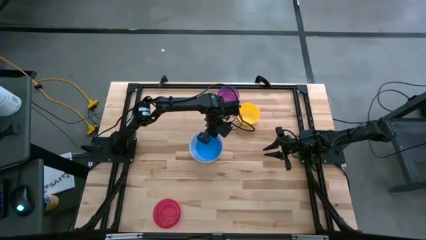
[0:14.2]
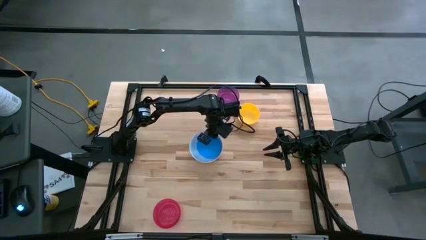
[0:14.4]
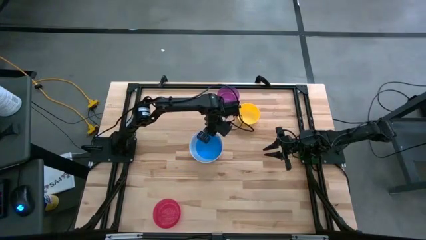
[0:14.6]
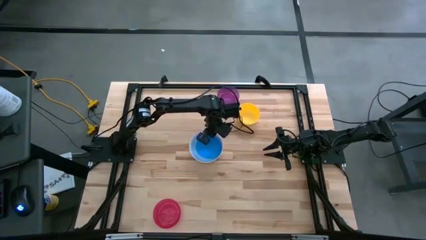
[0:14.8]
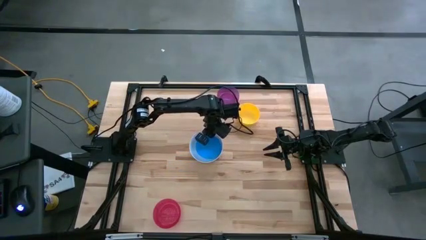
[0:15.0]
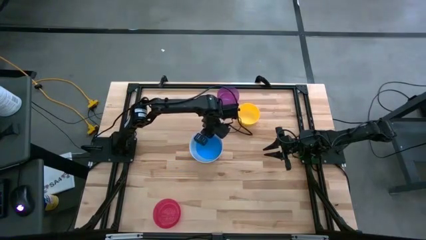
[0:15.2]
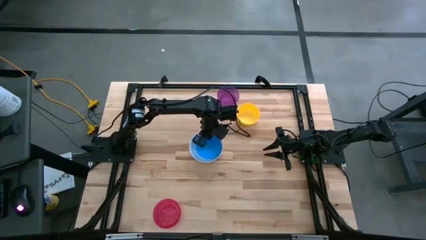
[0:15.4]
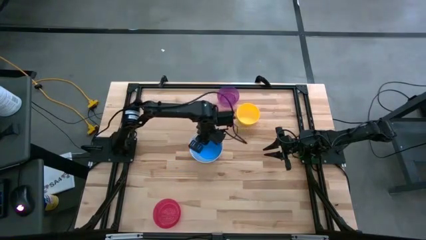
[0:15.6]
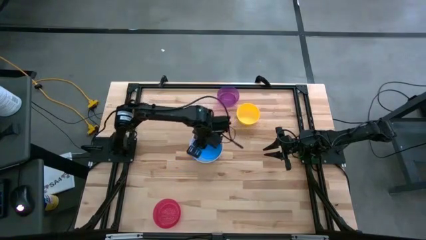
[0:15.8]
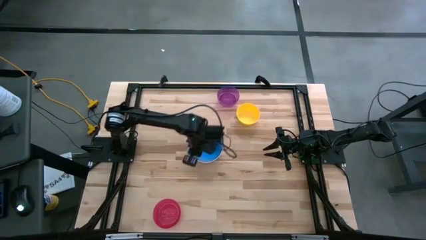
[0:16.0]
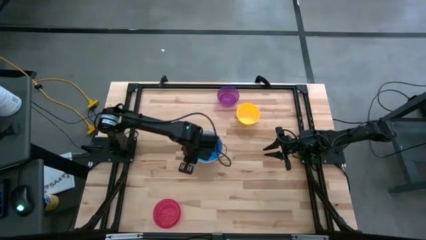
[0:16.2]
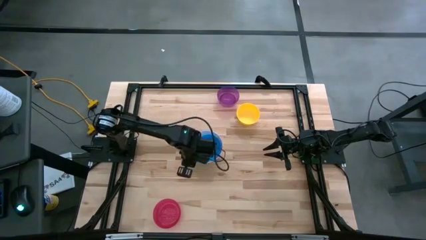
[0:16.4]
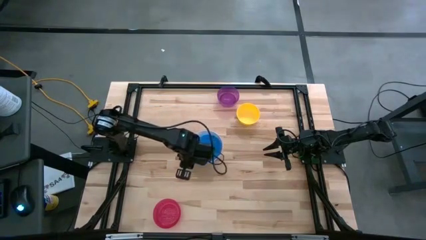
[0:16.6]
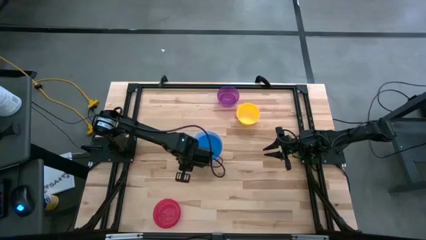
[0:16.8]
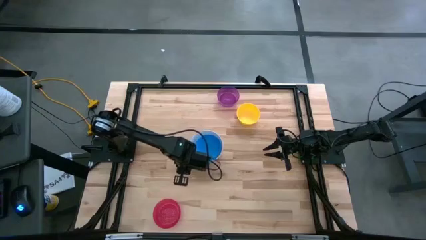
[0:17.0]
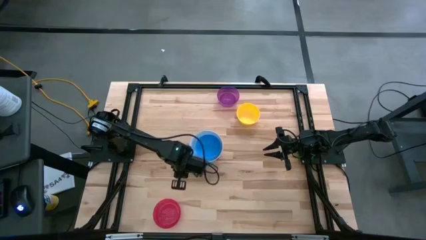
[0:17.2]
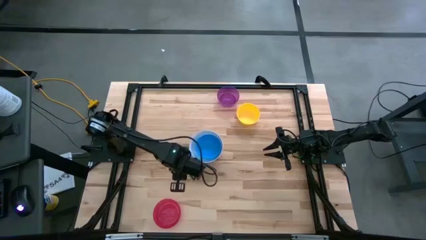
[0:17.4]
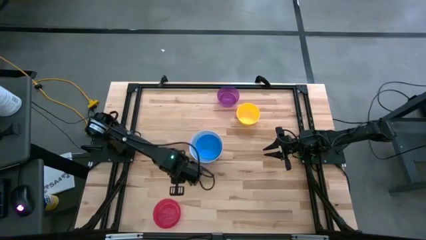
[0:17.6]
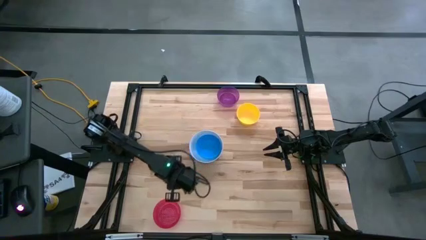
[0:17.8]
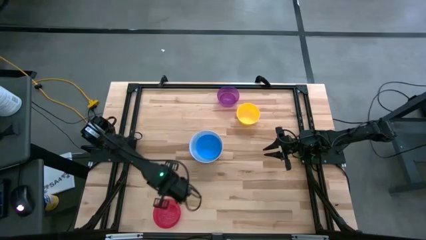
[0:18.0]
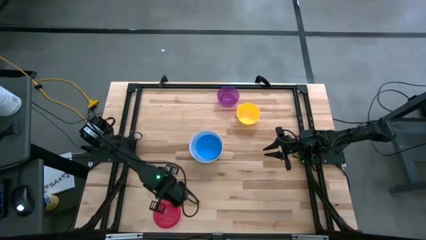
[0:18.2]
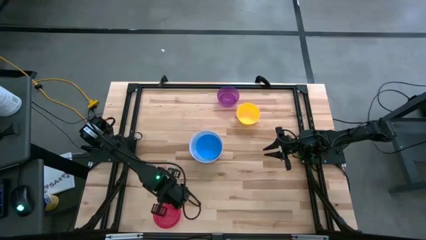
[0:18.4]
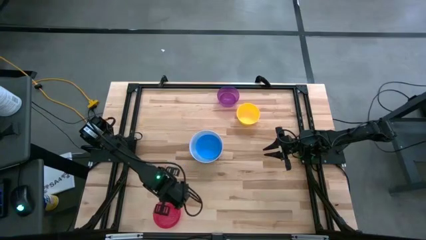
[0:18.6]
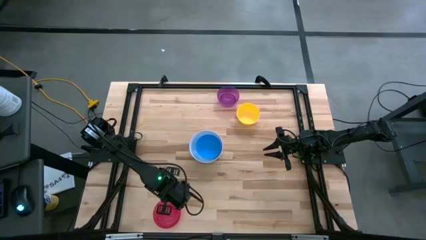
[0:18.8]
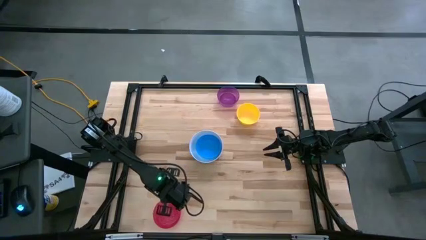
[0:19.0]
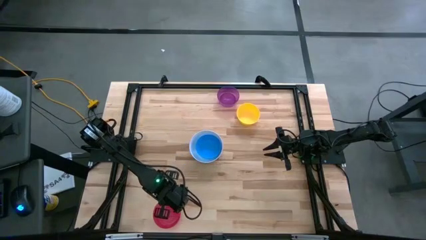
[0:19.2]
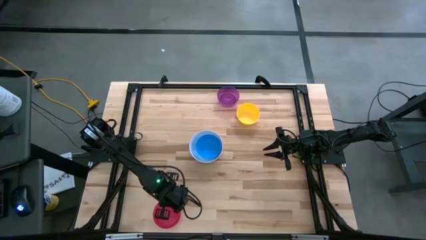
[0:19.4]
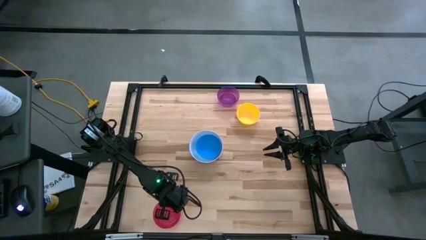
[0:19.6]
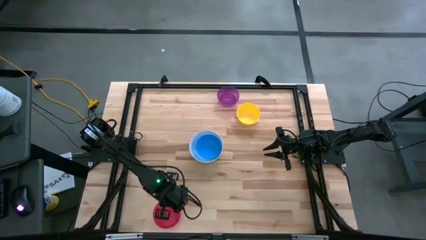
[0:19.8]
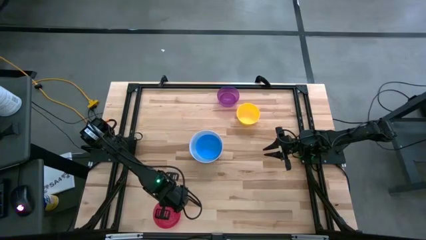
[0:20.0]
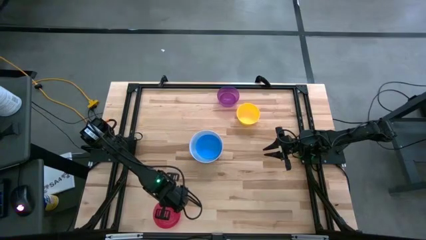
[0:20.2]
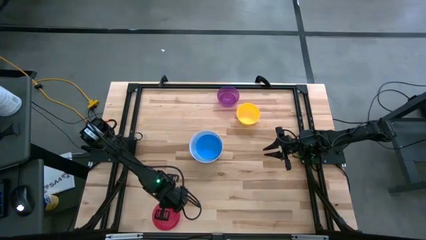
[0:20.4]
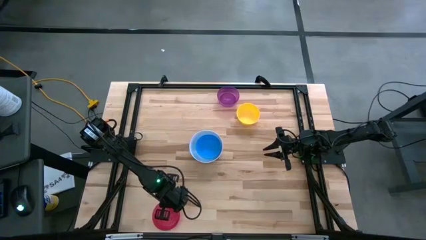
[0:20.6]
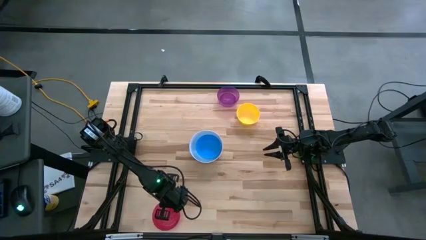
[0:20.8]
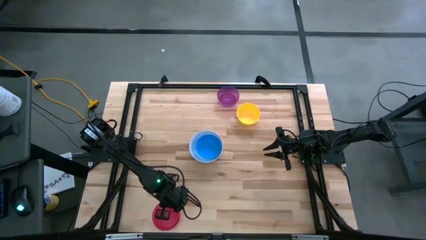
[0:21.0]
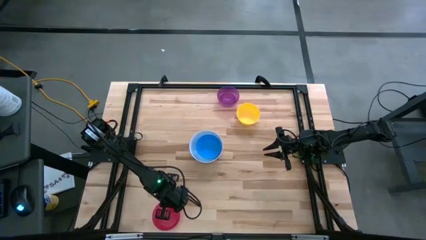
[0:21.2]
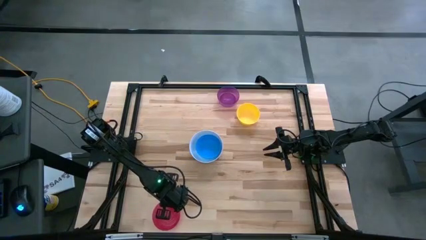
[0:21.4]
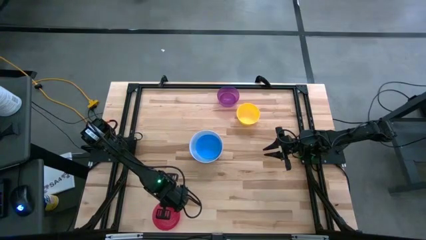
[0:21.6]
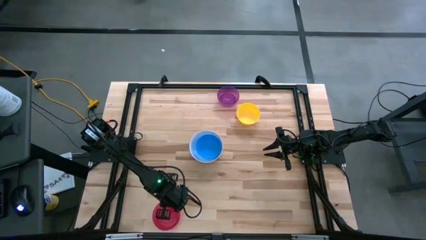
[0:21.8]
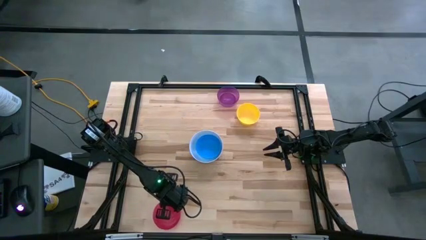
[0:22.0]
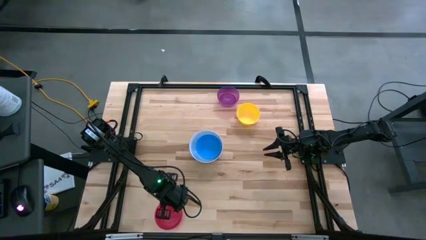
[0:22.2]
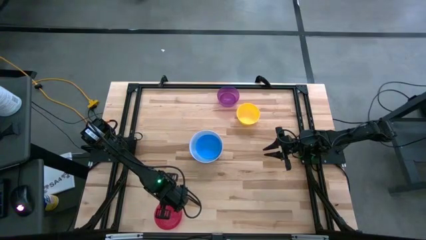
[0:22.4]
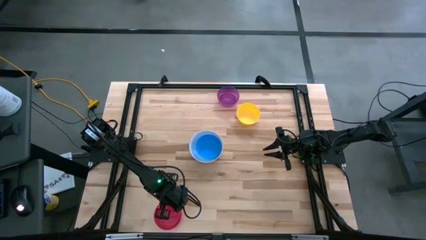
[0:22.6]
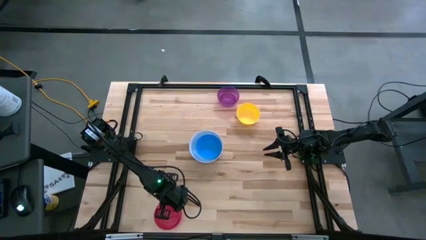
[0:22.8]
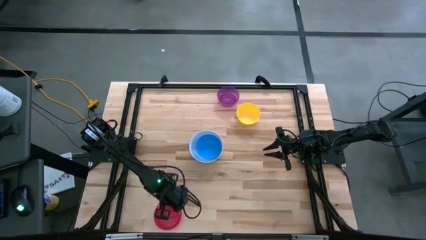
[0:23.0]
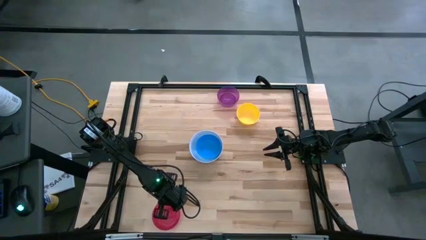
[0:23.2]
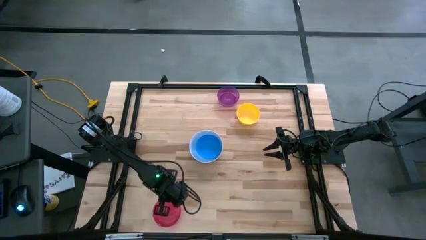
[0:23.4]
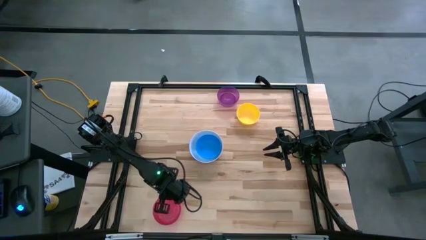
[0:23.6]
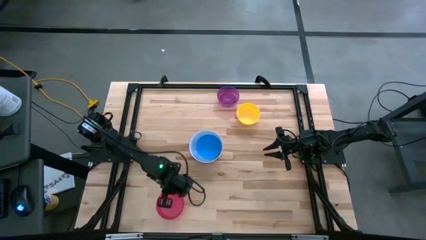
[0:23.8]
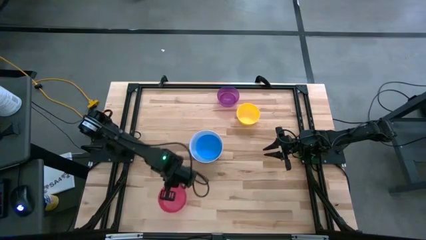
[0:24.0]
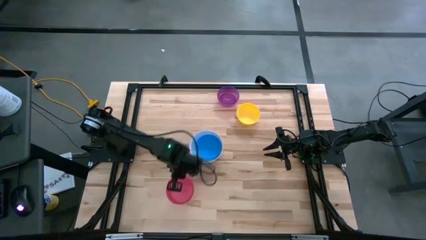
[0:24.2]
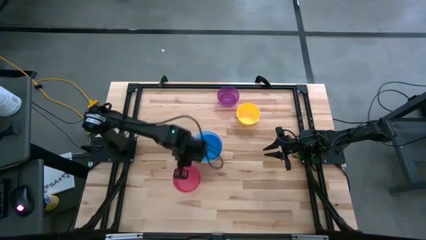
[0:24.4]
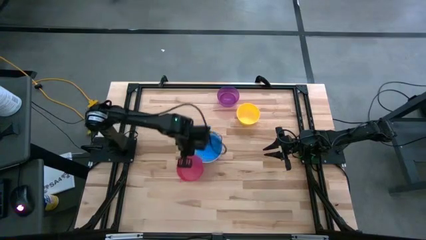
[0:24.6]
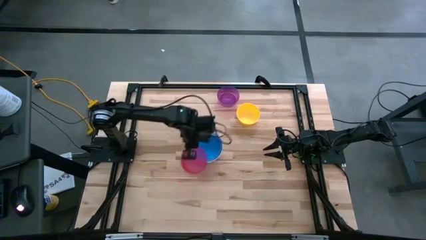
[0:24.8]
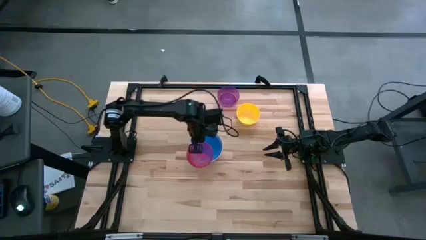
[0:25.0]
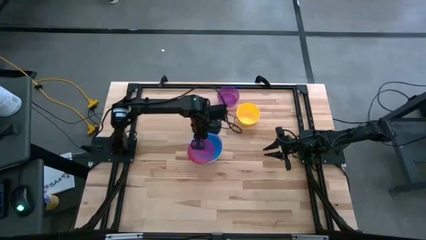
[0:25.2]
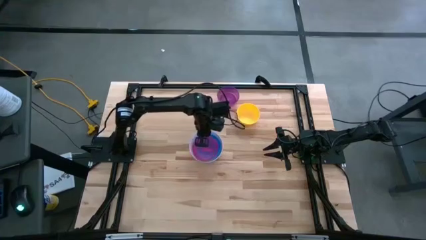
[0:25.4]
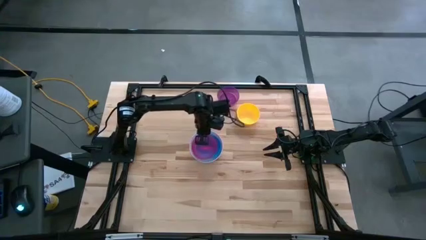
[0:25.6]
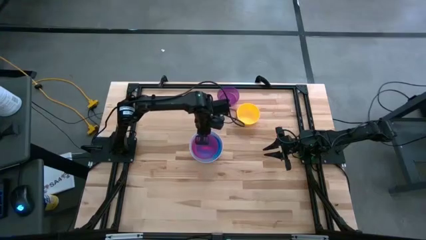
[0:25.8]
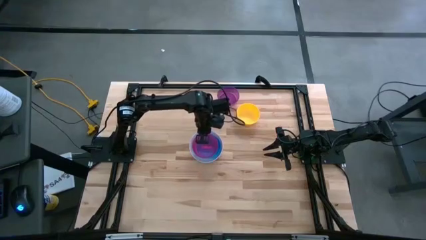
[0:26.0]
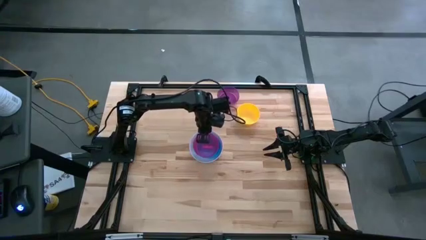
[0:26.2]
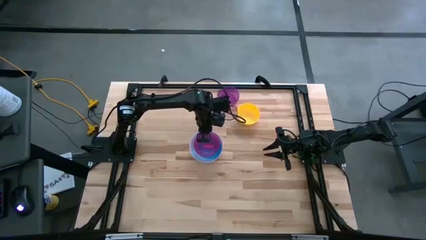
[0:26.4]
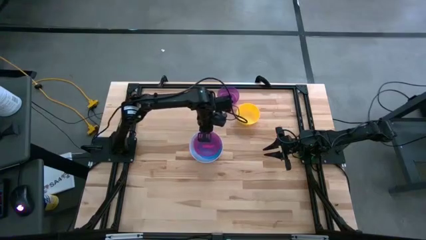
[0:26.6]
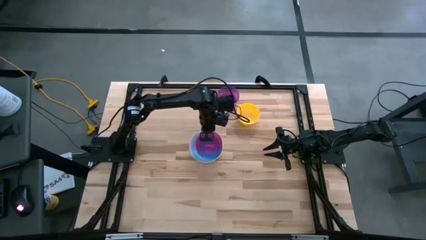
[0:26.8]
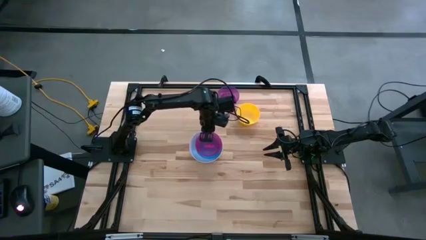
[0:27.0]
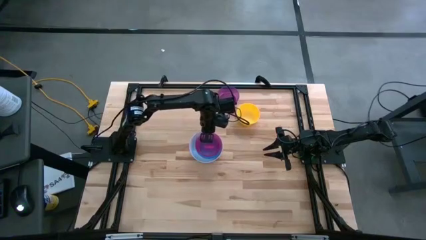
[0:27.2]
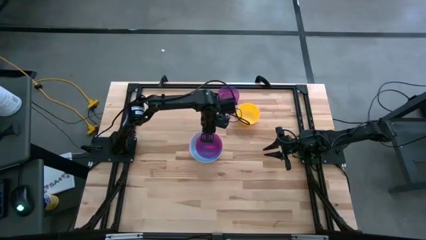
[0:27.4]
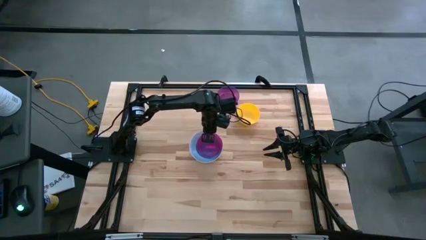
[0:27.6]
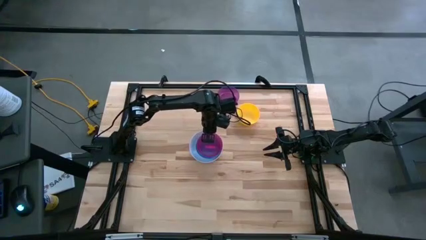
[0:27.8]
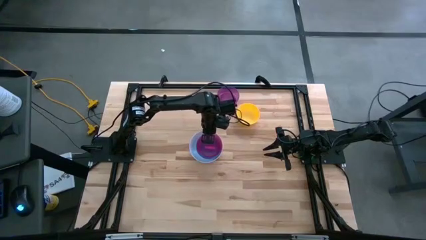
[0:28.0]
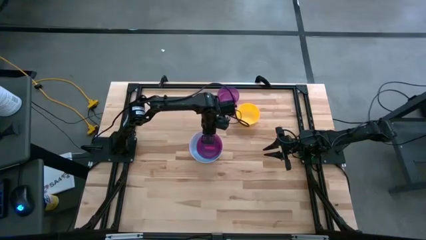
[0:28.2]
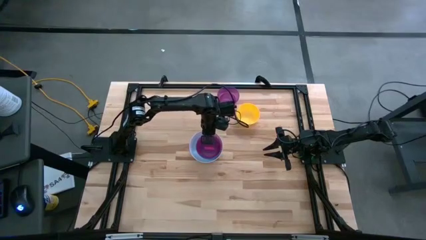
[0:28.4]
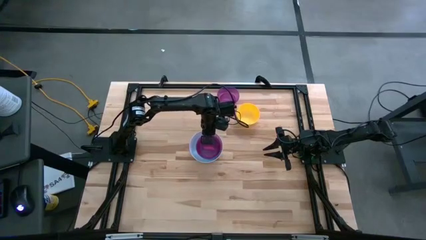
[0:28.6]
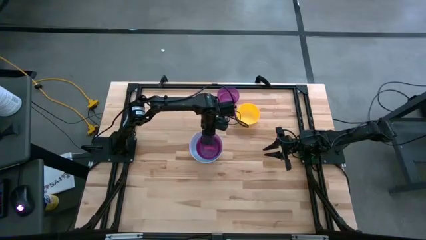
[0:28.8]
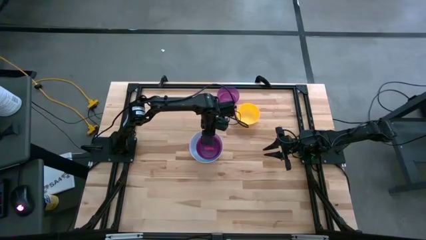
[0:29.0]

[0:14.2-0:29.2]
Stack the pink bowl on the blue bowl
